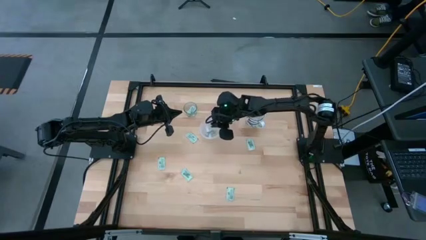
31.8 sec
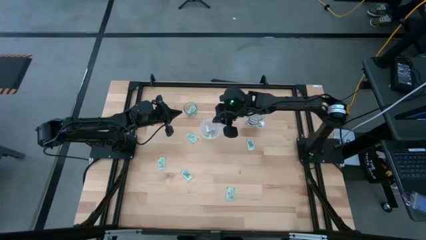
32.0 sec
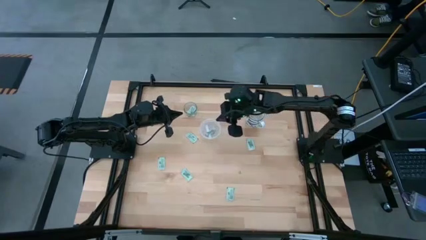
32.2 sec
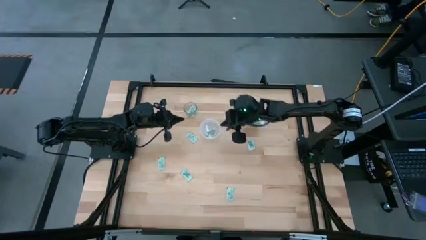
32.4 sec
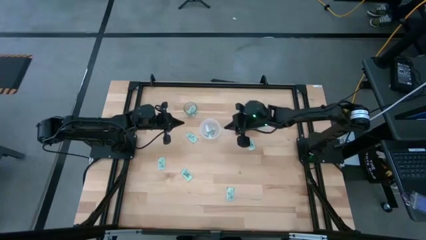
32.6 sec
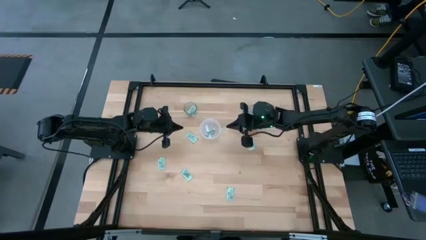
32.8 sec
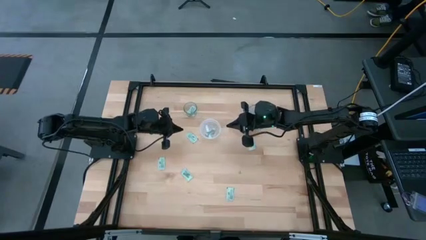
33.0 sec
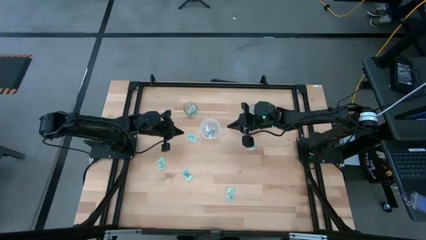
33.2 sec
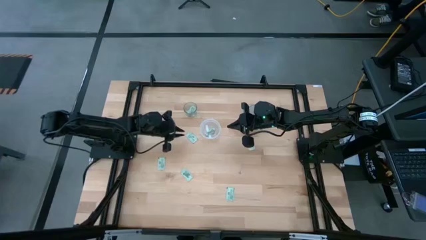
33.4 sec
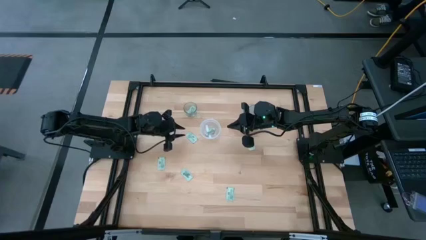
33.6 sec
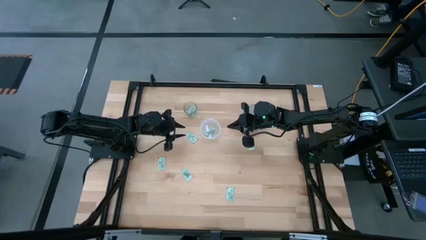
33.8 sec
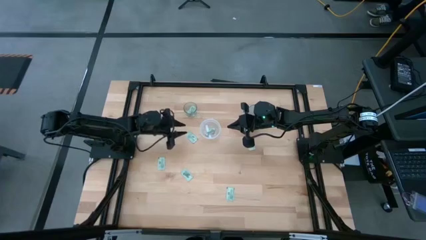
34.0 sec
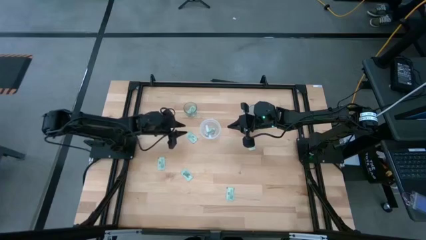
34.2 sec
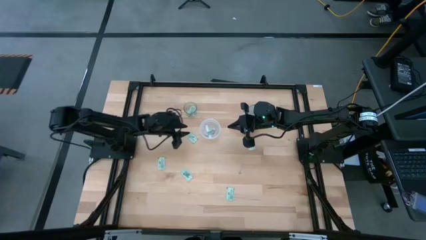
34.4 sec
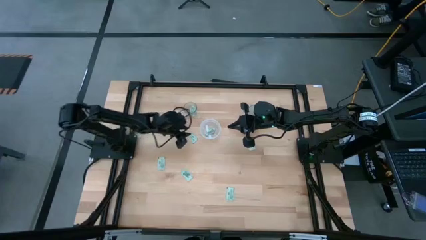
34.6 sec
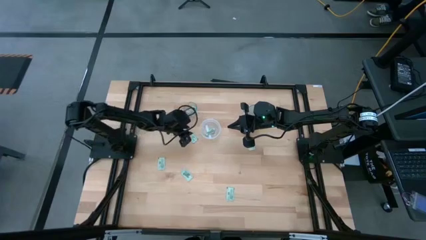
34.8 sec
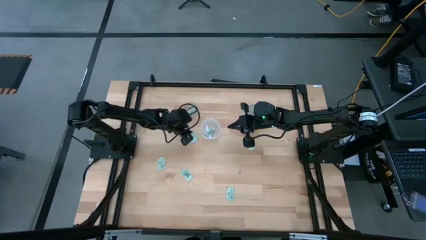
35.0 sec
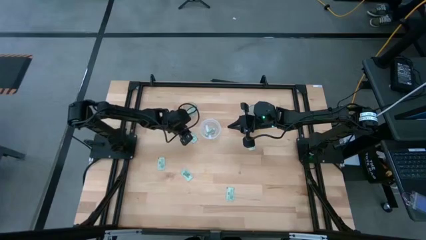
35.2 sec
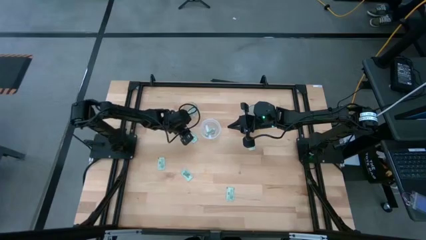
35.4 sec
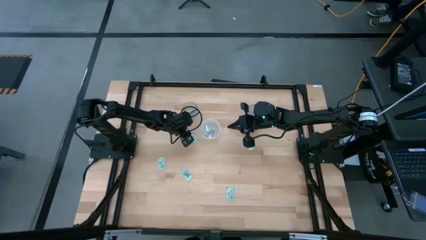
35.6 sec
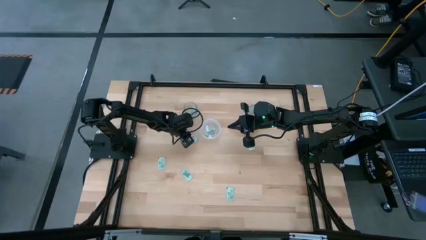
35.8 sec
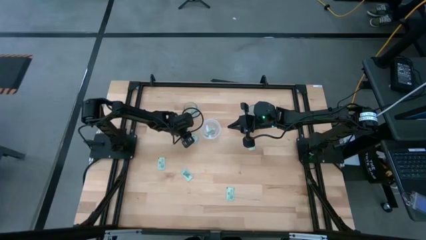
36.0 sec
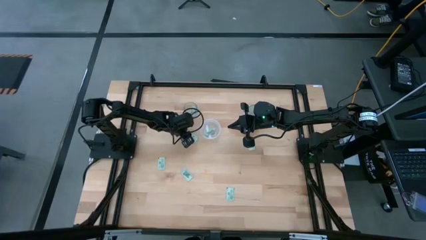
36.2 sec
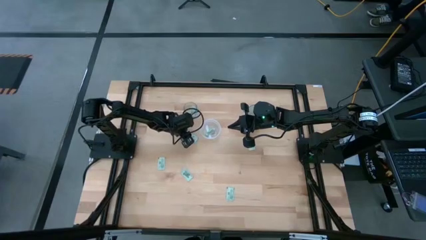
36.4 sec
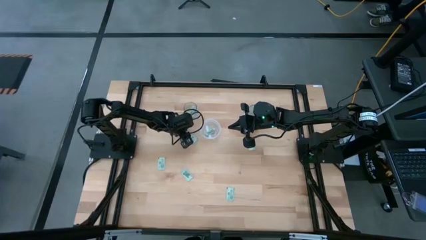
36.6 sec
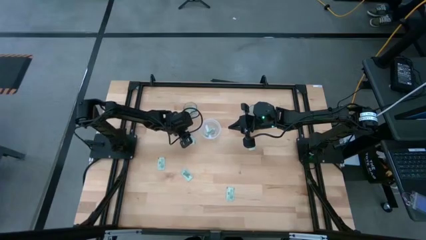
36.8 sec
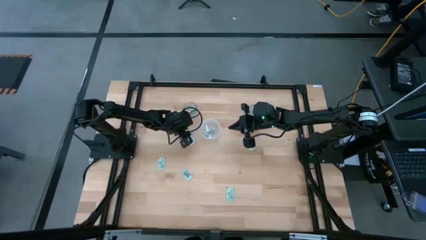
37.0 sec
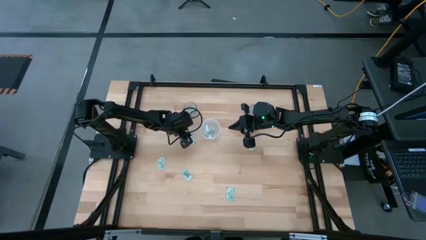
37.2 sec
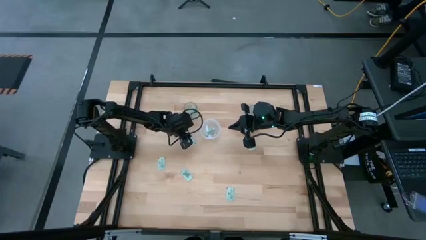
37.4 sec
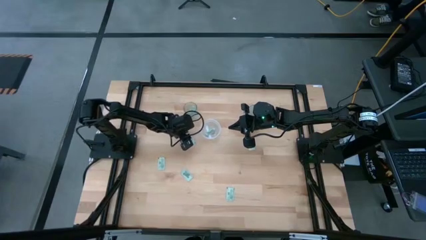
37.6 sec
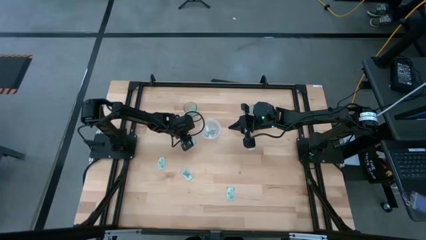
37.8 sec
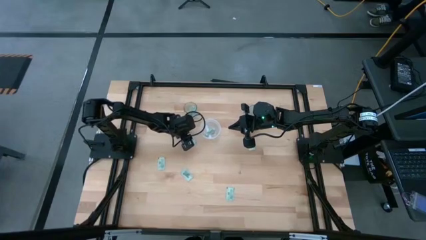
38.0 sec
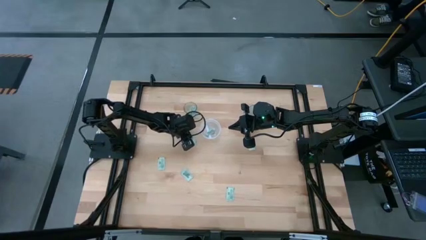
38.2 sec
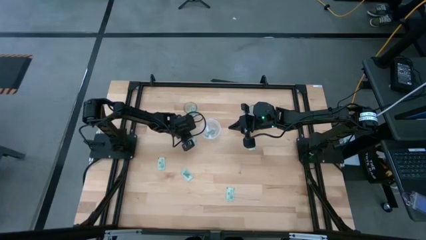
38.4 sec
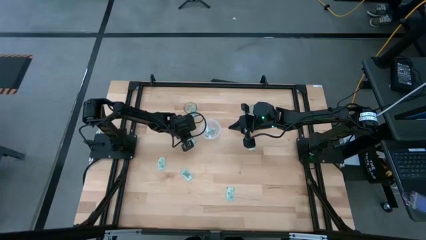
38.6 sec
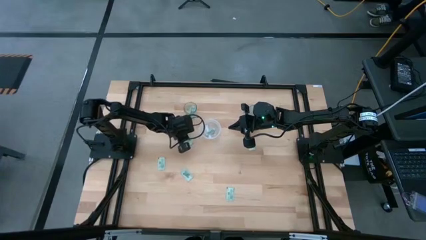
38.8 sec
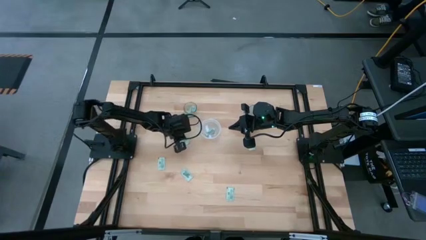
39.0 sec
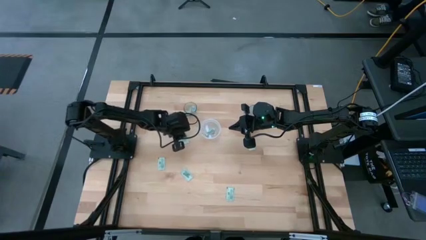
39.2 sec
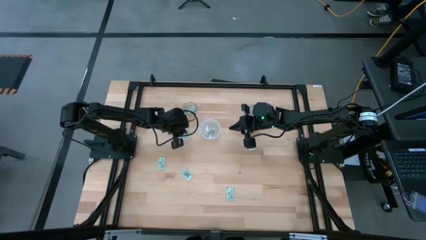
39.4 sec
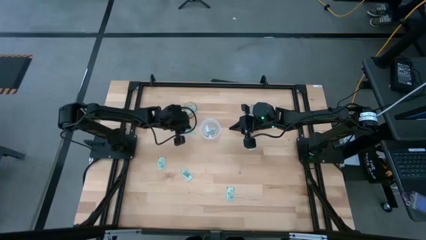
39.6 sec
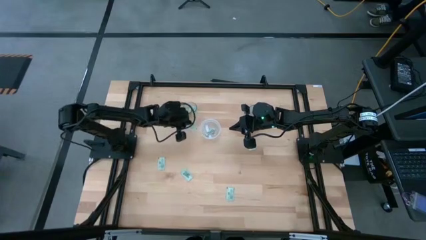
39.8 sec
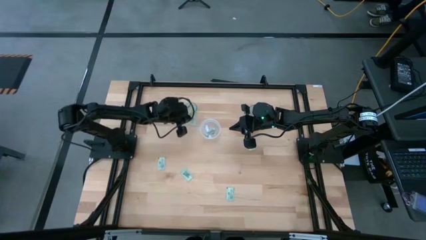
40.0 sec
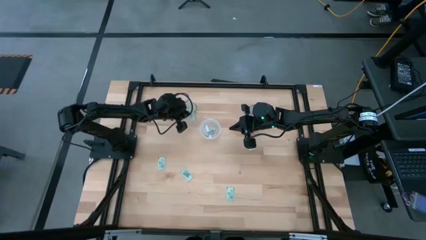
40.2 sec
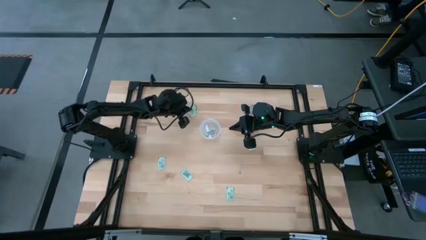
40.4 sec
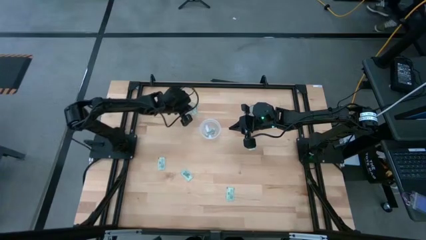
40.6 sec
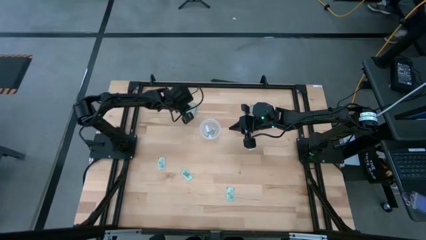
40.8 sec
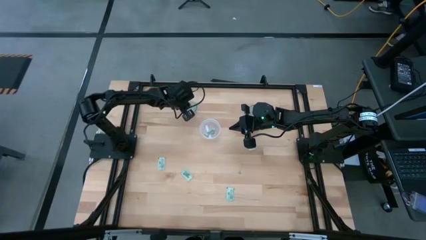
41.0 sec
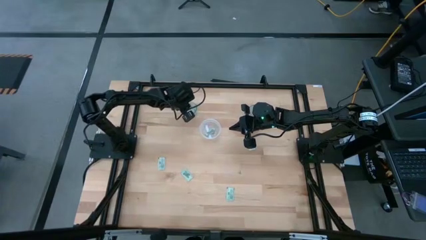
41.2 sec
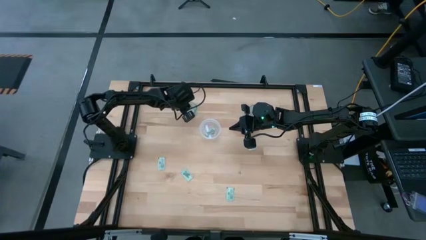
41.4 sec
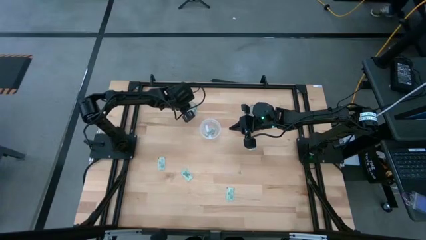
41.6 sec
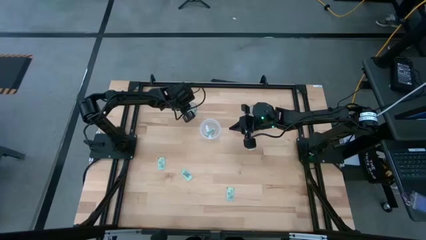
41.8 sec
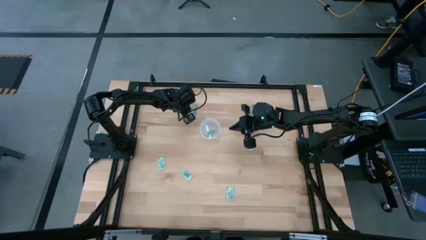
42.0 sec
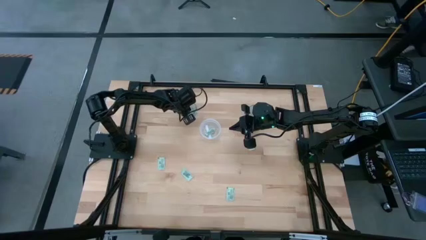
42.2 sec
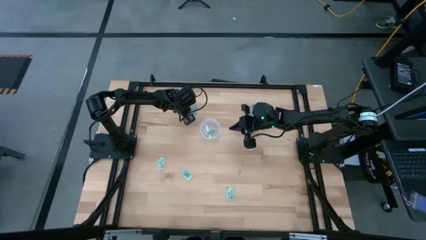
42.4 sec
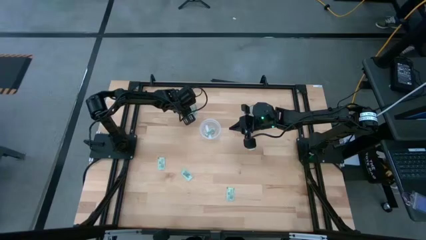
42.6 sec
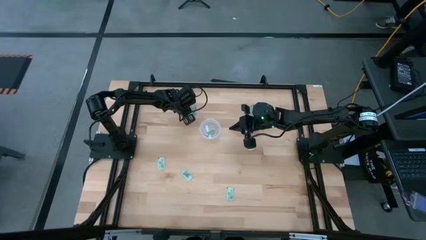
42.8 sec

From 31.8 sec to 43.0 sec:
Task: Pick and place Stevia / Truvia into bins
Put the stevia packet into the glass container
